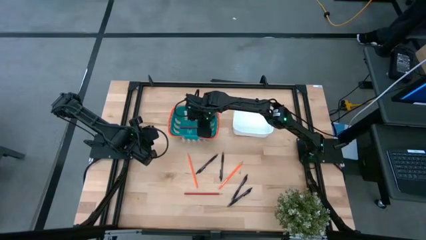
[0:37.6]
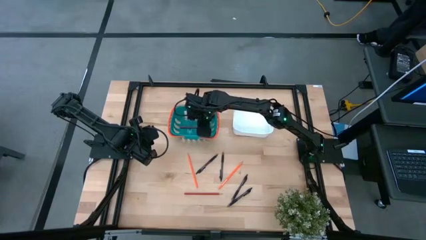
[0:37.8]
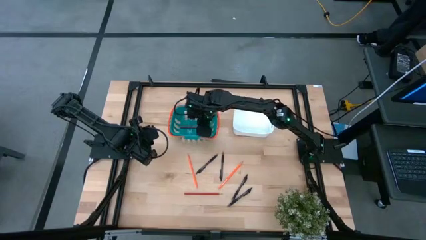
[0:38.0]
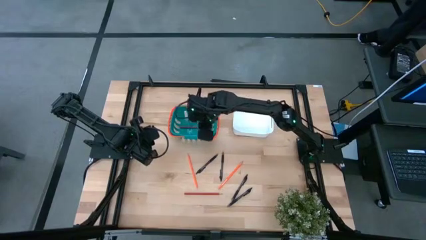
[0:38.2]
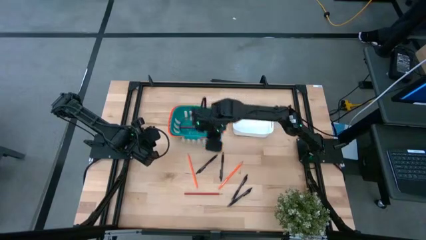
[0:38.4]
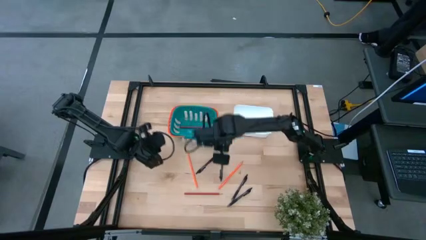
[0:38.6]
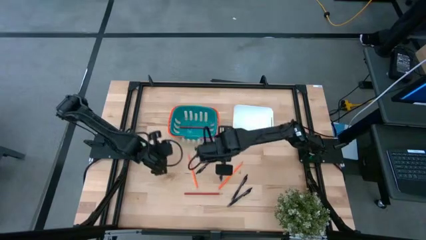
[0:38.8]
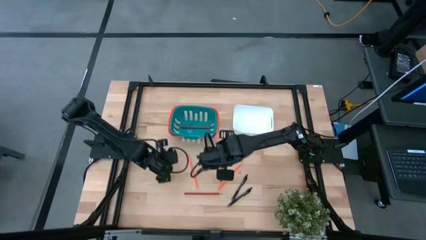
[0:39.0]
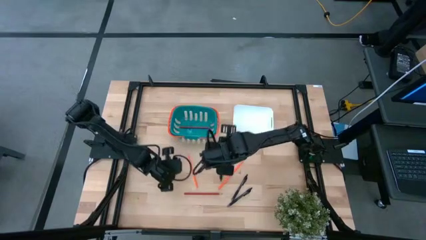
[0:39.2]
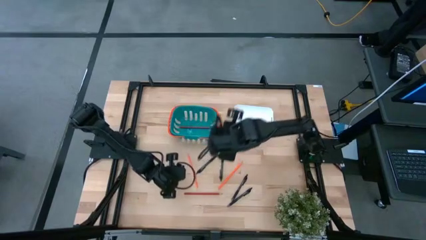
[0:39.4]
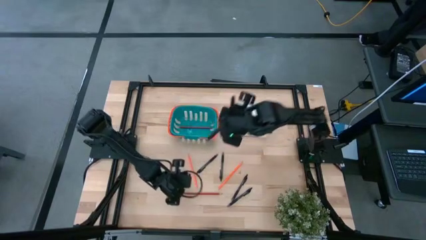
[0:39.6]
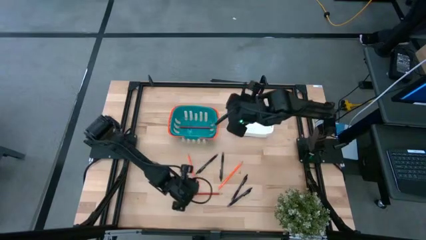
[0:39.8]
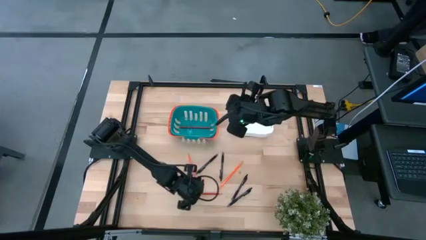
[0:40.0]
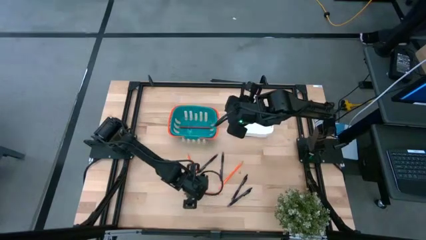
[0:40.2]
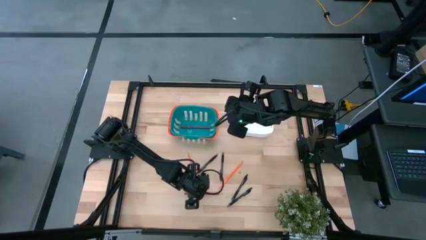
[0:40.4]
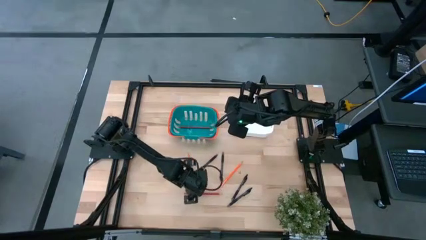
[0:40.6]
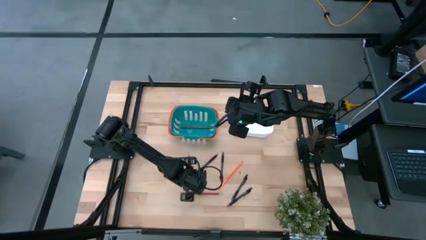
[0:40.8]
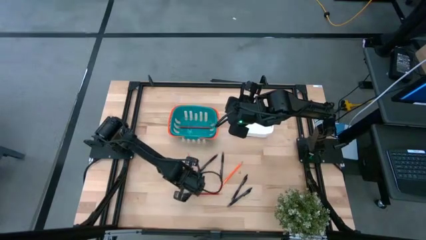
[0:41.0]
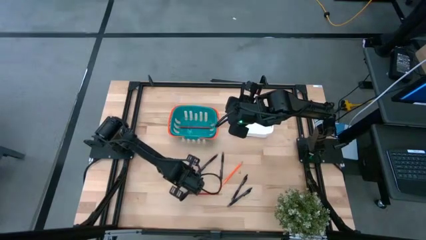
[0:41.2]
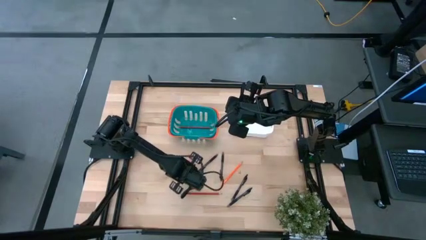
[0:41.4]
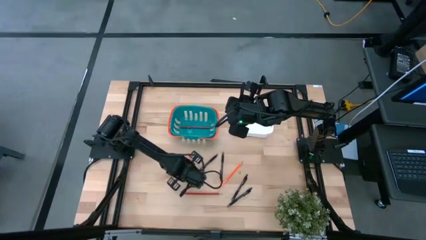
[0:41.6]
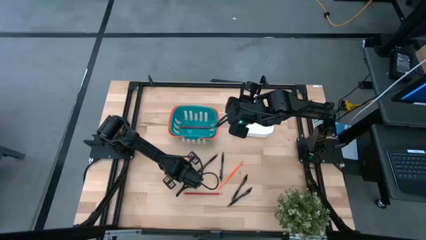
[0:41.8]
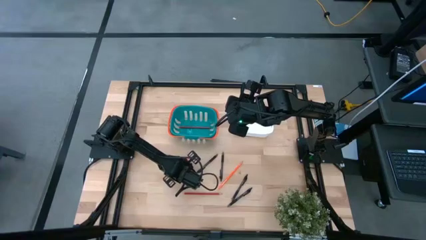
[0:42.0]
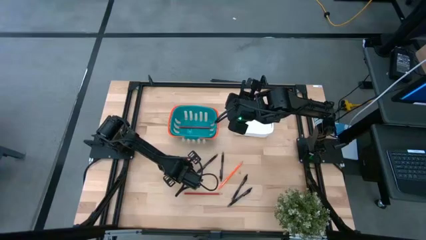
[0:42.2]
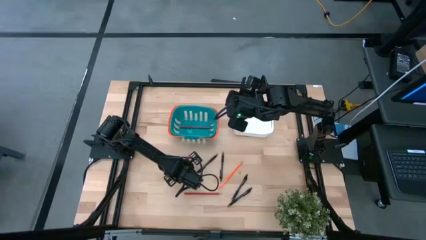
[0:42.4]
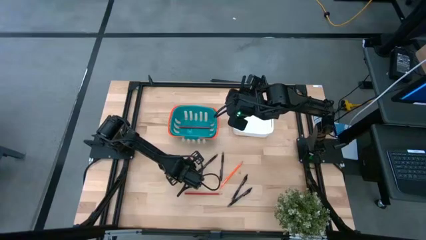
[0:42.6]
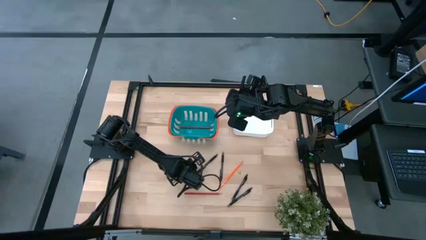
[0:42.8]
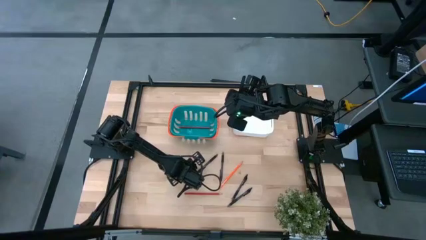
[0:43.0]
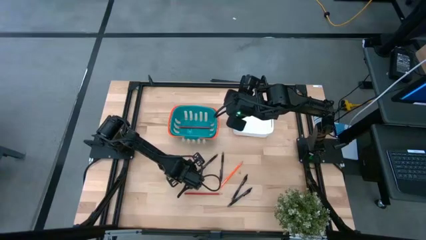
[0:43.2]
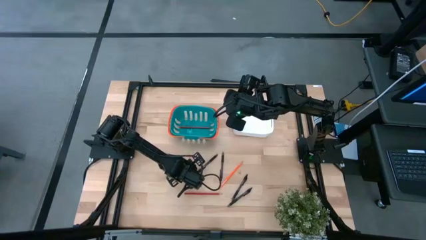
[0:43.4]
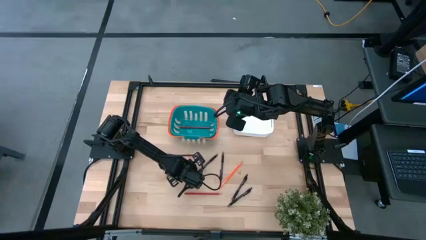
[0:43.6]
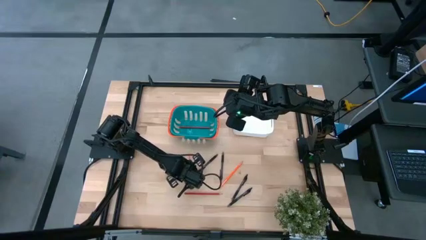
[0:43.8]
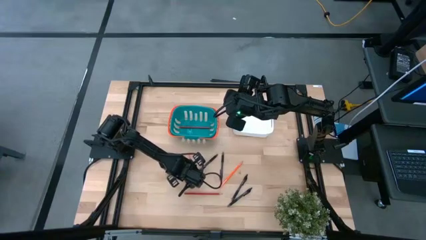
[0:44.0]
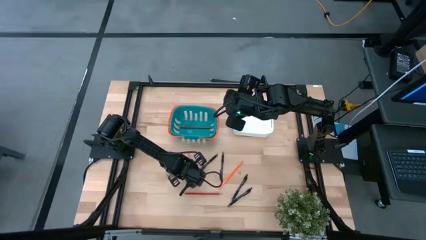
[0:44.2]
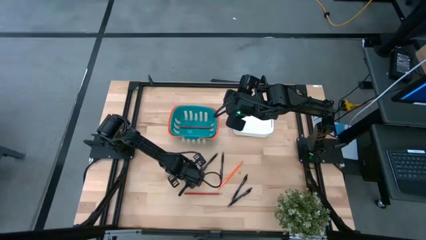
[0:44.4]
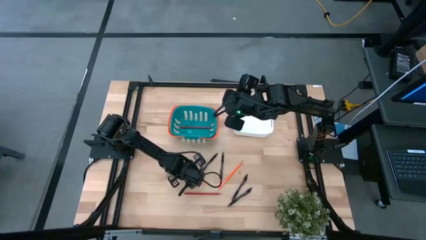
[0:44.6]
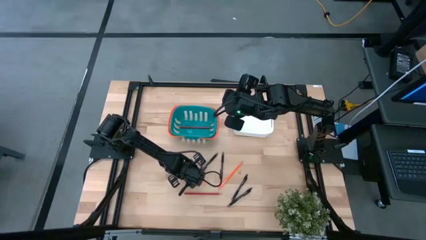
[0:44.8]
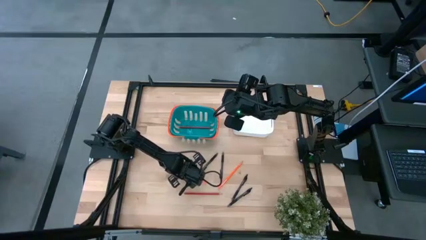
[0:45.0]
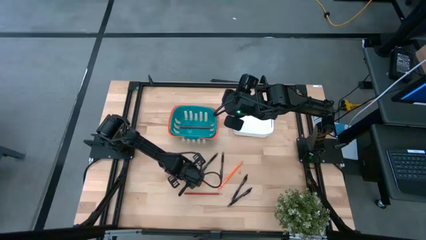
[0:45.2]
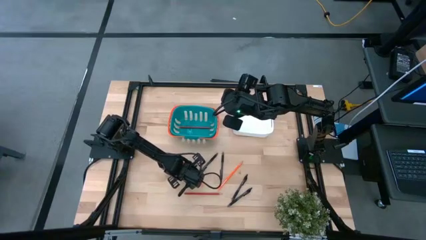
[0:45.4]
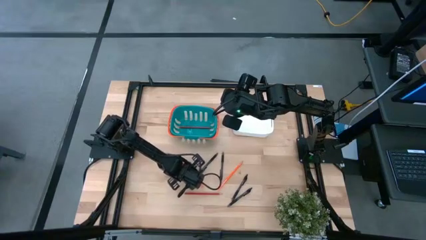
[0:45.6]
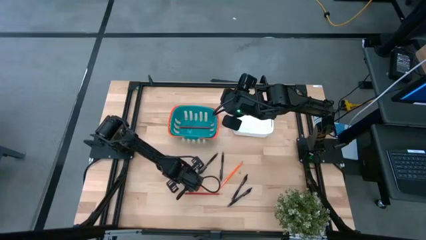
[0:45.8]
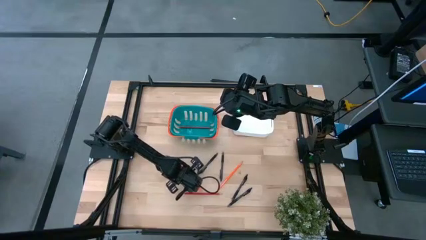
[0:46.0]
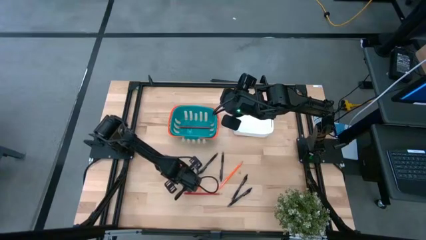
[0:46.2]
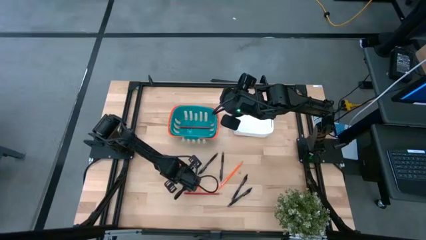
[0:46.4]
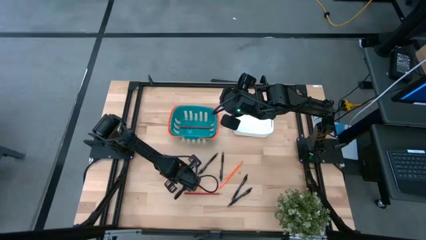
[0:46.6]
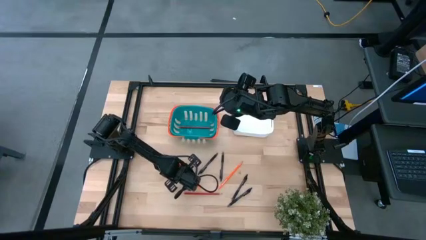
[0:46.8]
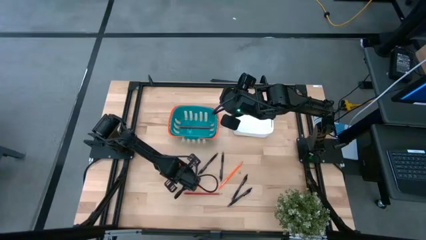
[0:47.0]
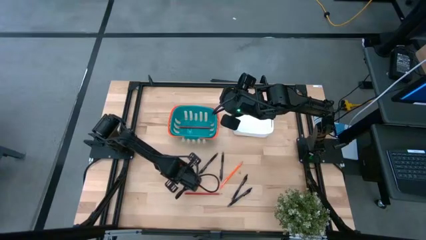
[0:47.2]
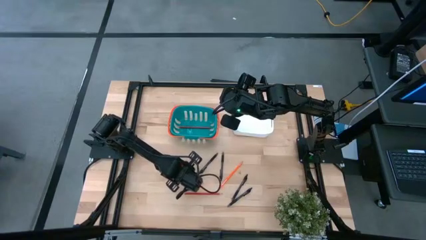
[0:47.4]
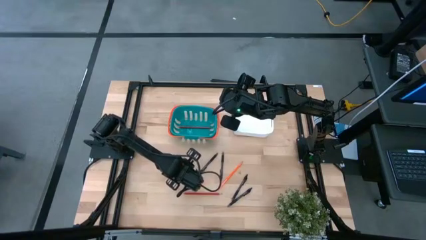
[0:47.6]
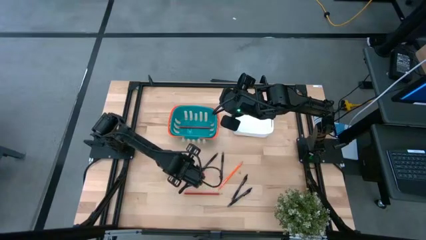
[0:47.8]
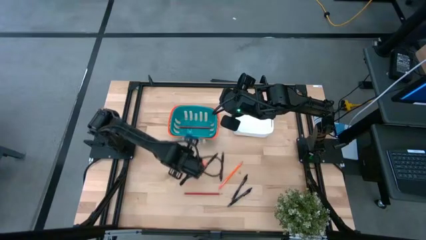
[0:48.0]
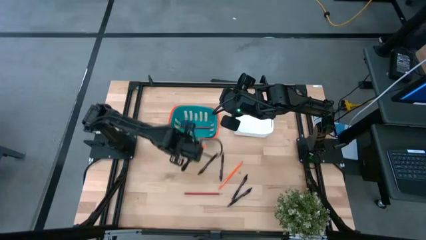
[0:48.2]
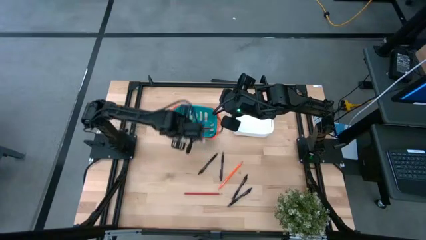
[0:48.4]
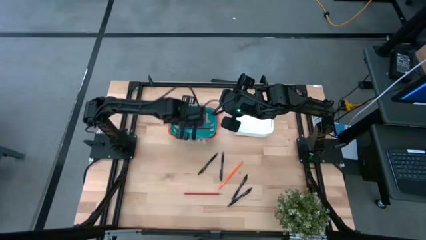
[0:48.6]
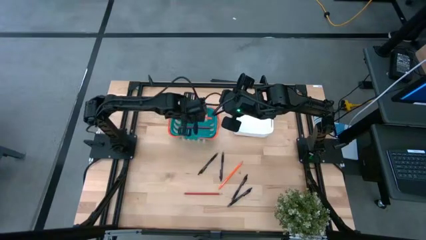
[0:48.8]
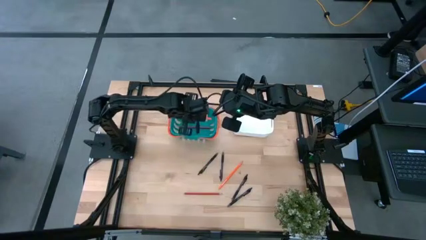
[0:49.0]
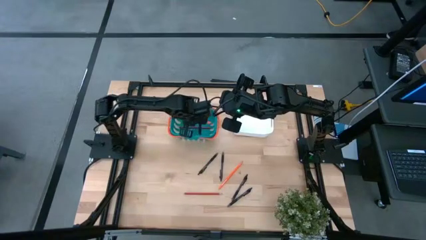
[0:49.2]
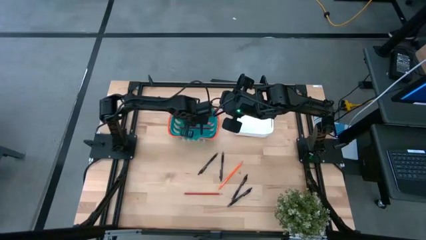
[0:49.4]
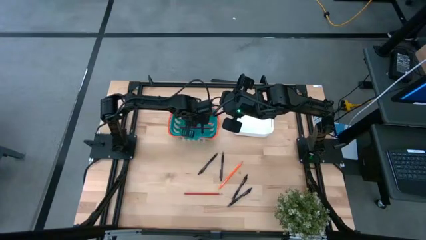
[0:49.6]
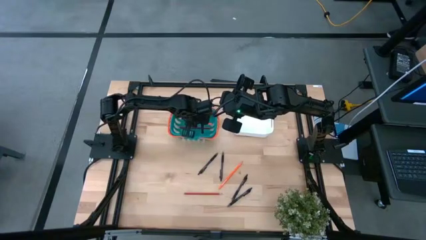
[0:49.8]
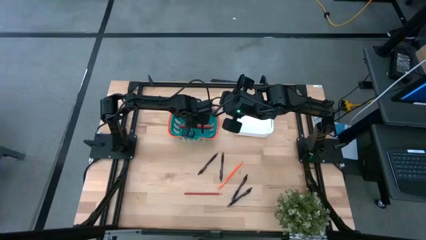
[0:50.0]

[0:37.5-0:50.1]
Task: Sort pens & pencils
Put the left orange pencil into the blue bin

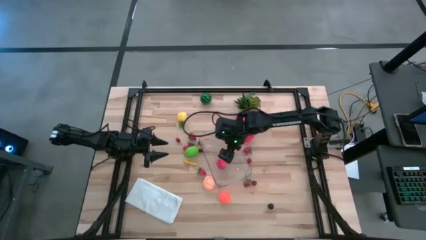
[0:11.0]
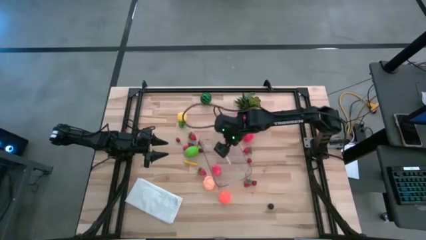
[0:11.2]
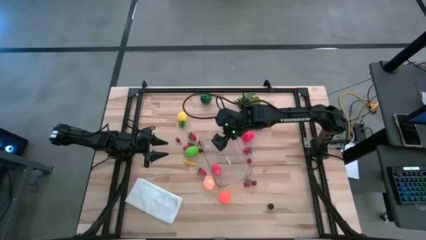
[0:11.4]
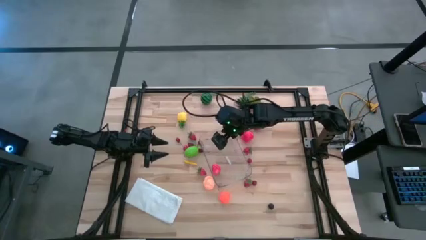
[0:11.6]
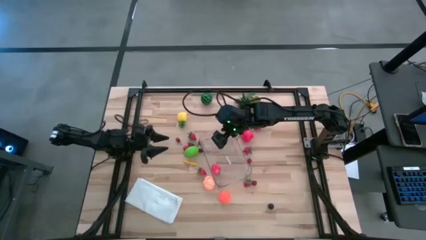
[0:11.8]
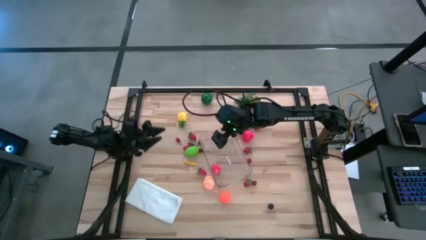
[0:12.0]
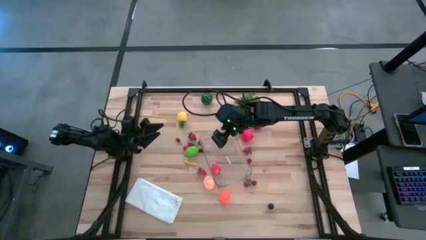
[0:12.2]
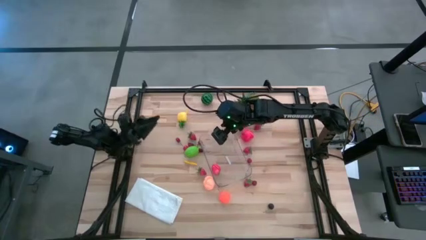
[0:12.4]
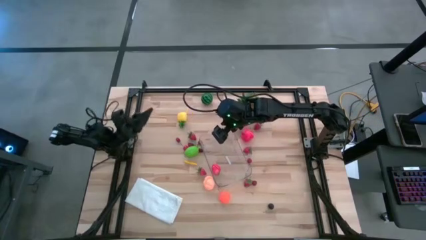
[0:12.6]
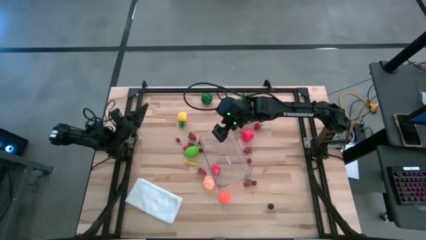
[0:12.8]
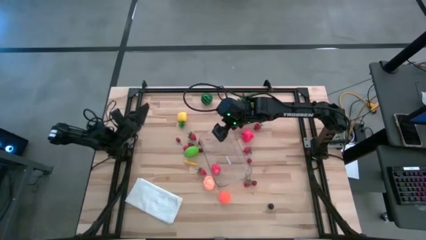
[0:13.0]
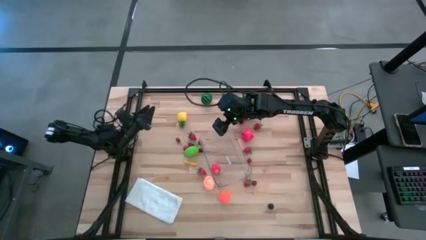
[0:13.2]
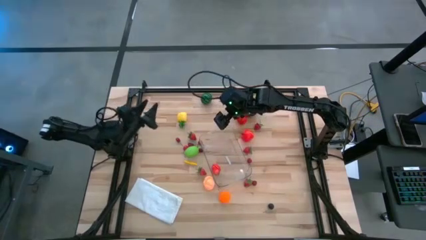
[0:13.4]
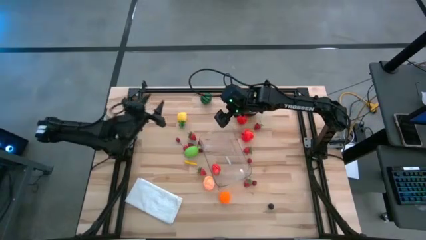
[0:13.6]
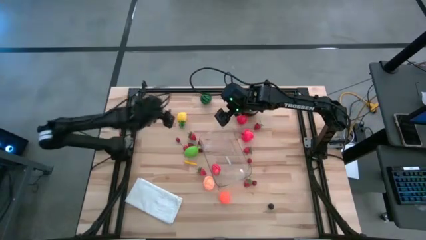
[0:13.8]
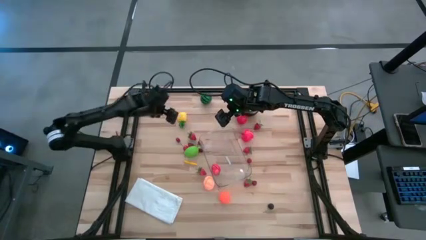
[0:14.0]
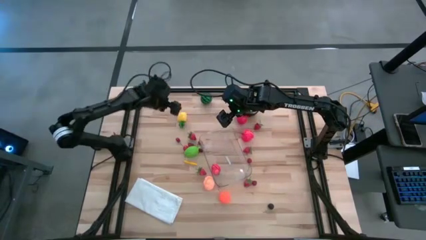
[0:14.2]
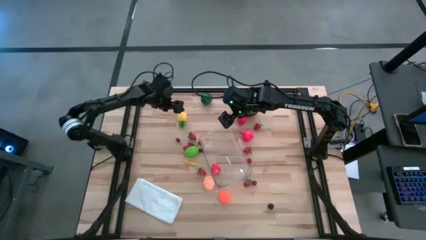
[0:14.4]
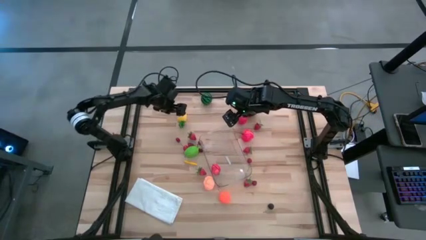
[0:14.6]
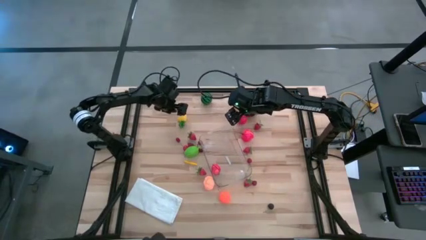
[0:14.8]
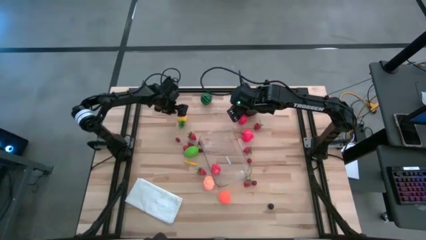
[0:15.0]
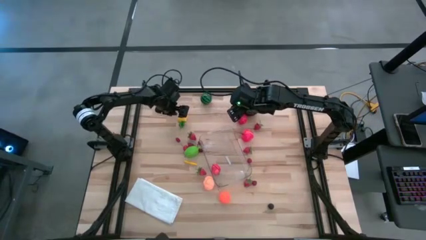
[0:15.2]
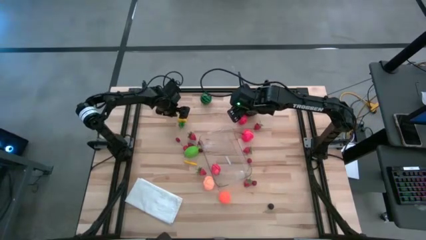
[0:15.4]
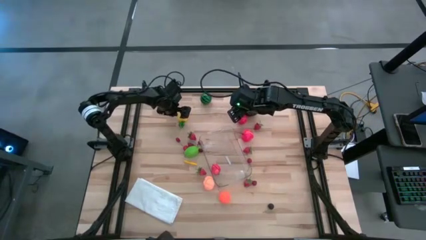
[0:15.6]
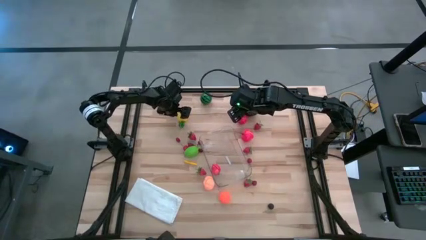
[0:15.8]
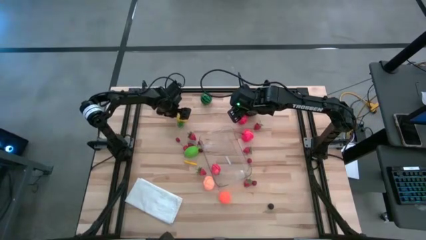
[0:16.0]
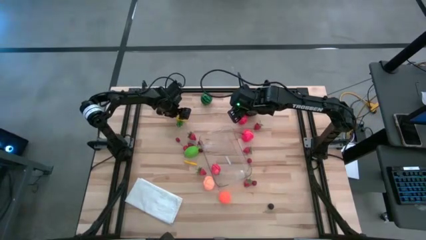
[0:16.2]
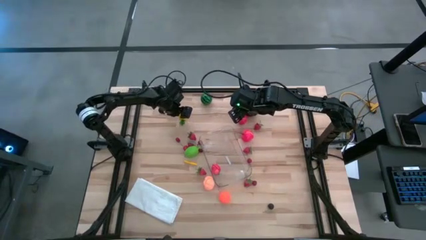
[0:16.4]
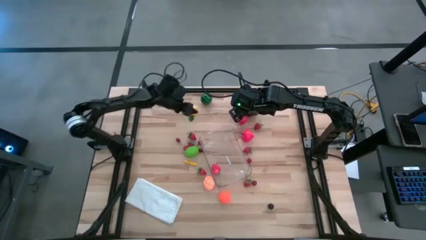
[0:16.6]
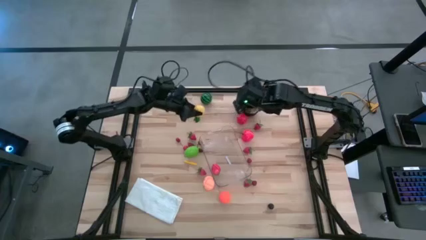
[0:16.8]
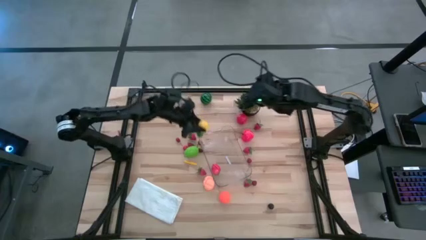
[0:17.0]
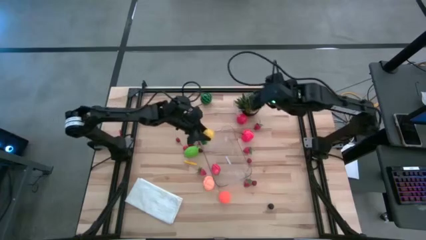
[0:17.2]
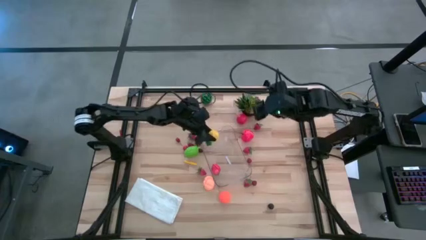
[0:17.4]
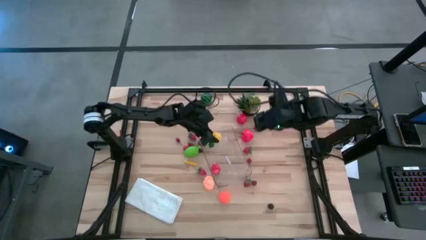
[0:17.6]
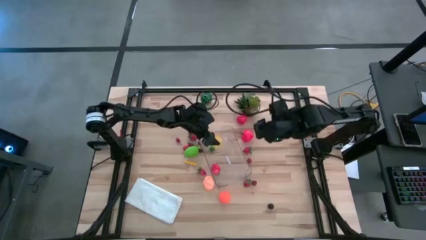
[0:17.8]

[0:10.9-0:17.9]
Task: Pick and placing Produce into tupperware
Put the yellow pineapple into the transparent bin
